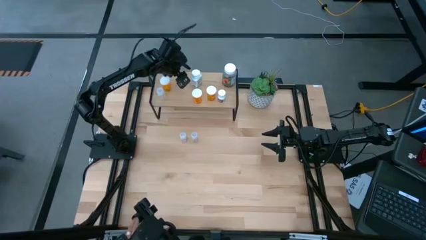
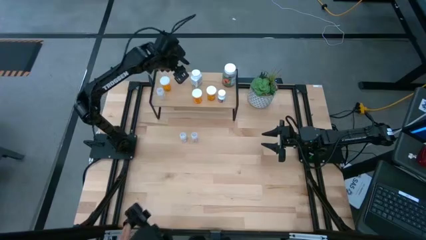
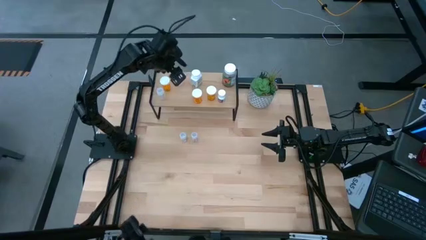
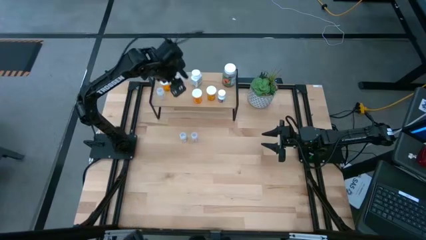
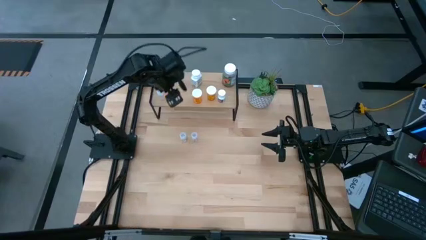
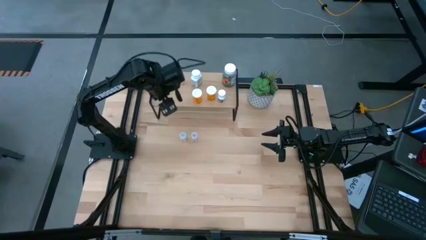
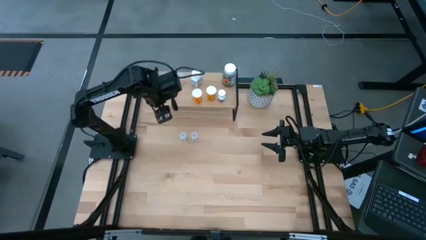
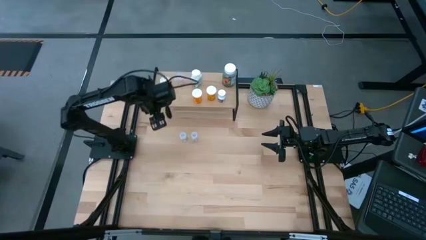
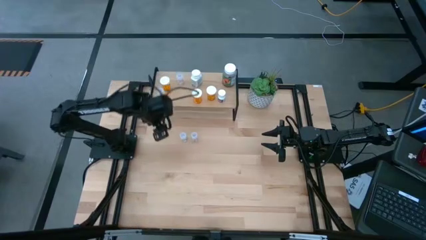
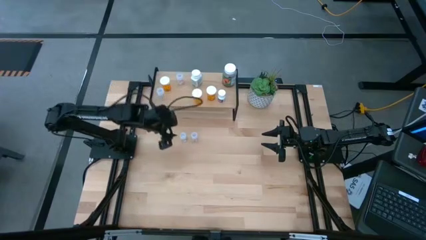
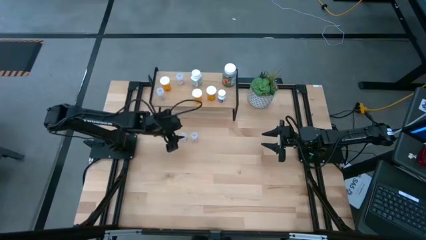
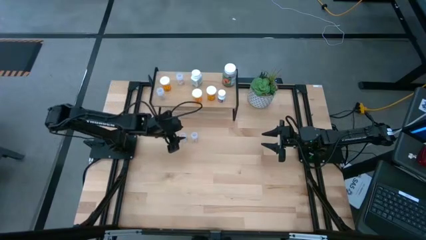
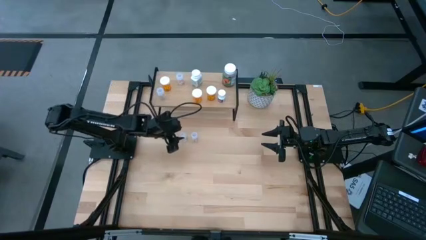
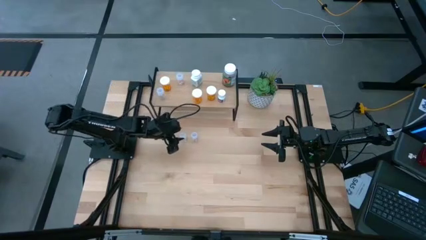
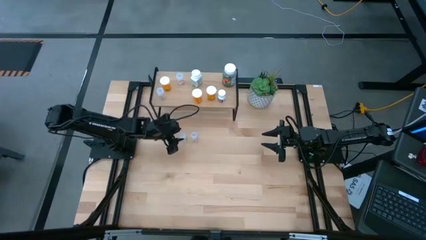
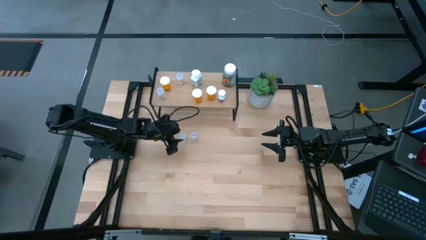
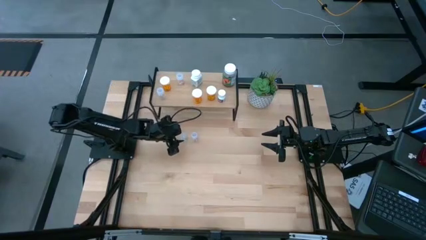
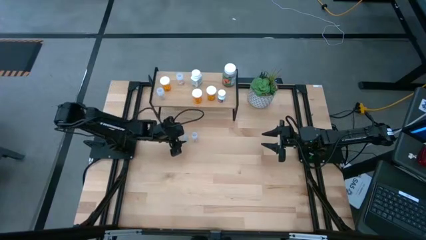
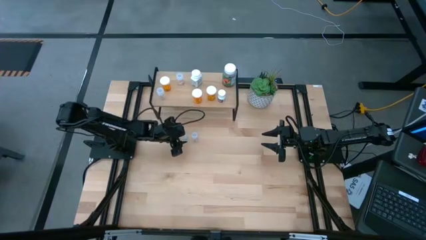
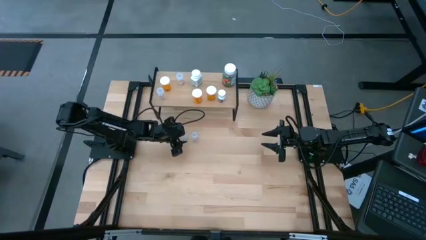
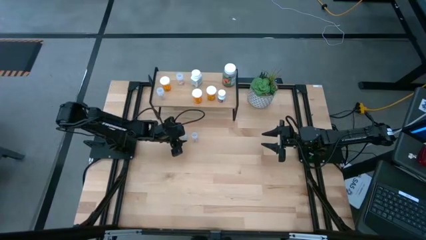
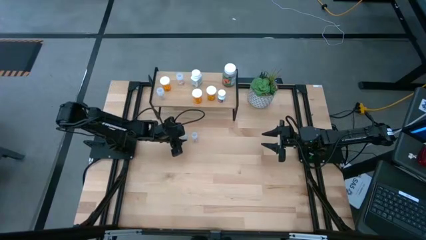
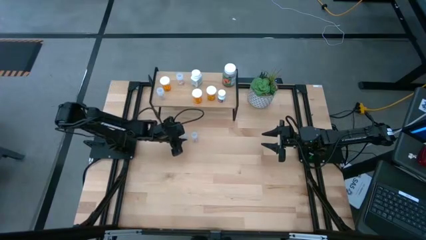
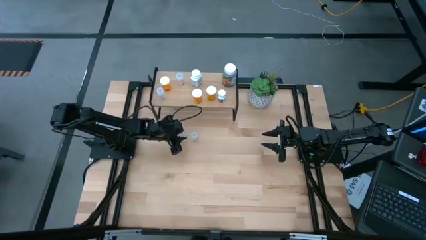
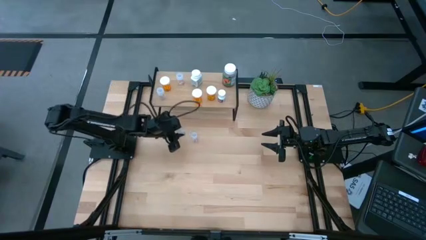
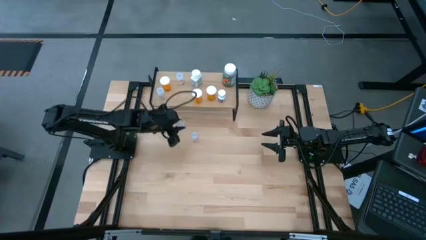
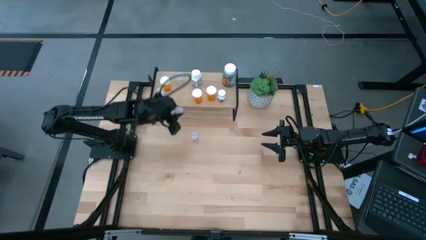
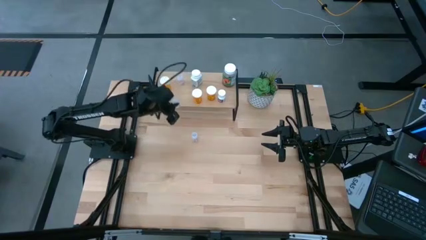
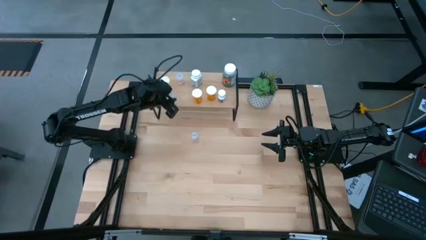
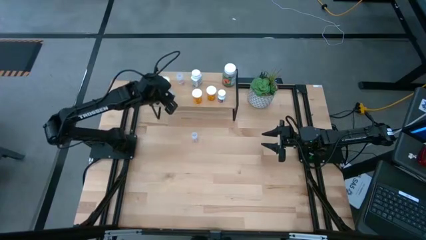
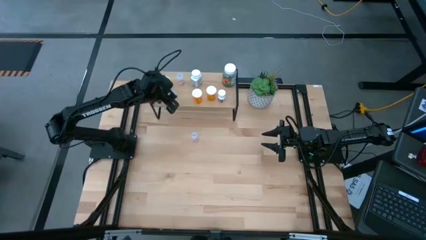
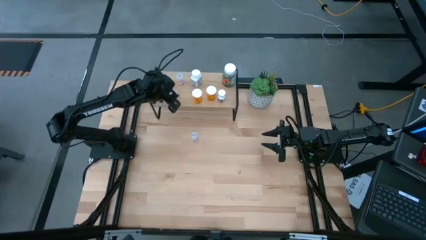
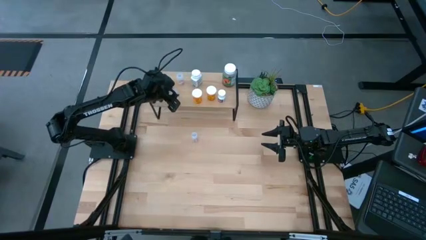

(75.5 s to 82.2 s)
Task: Pick and place medicine bottles onto shelf by color
Put the transparent pill bottle on the shelf

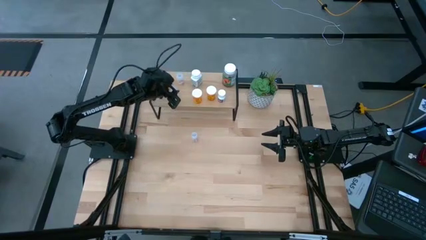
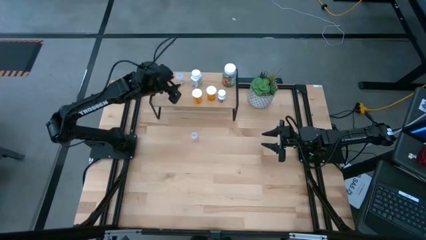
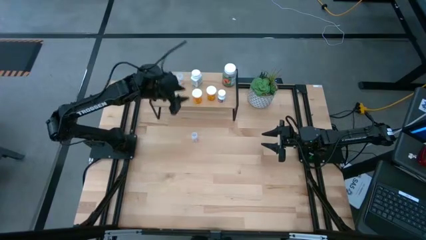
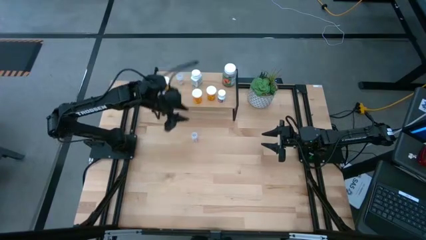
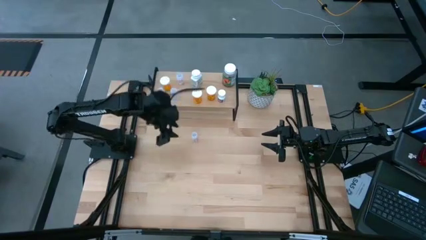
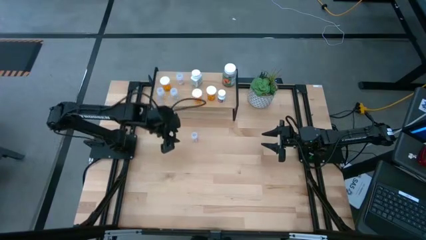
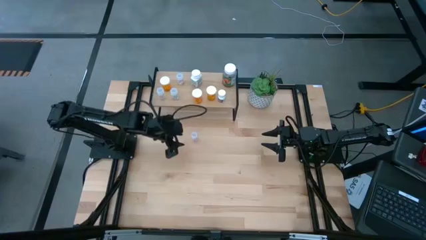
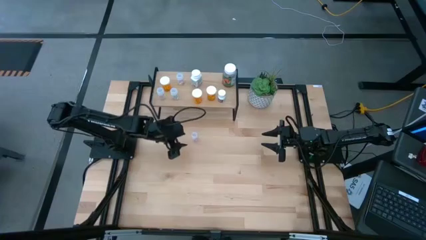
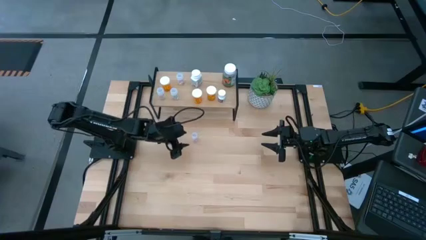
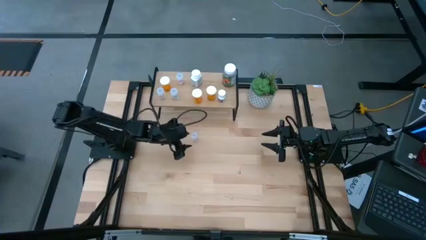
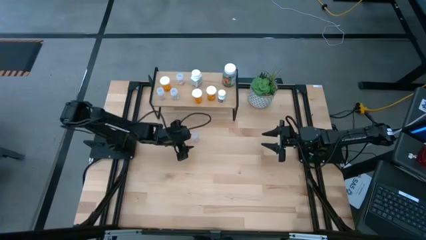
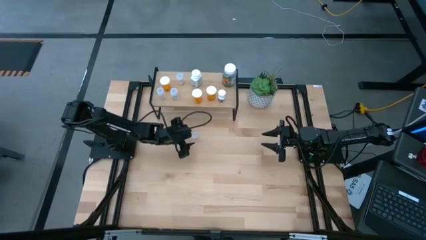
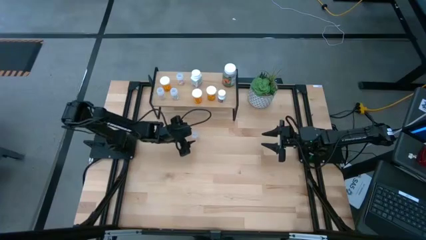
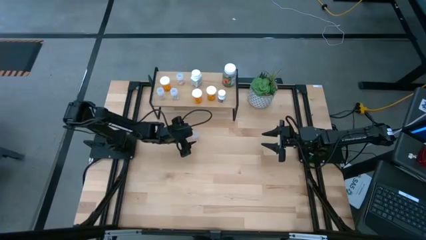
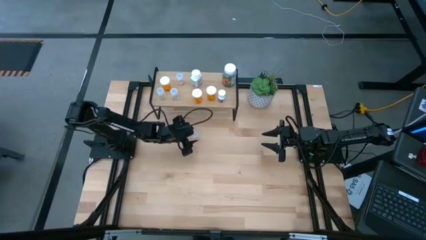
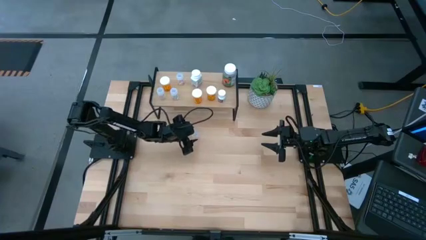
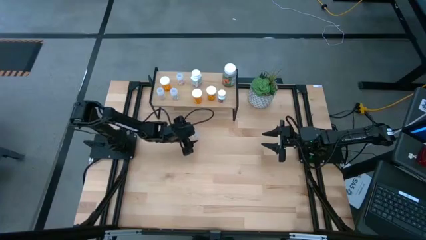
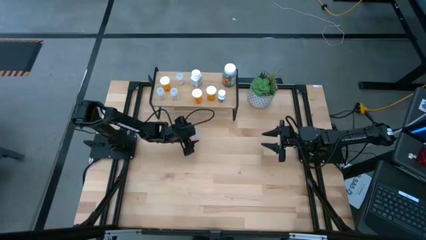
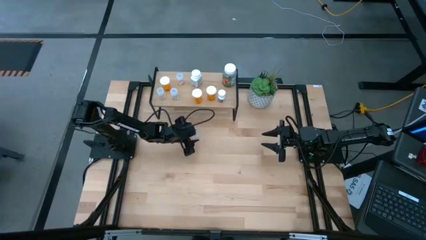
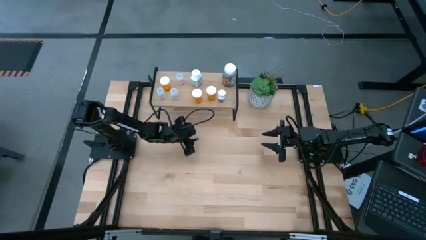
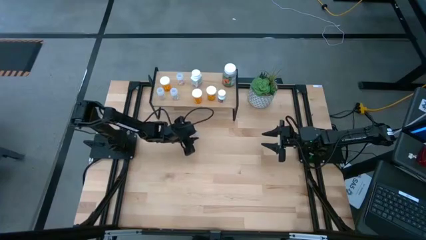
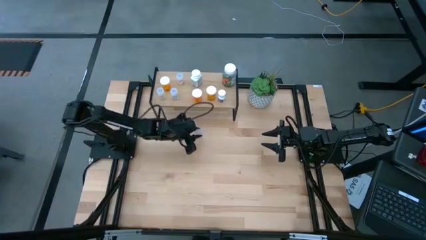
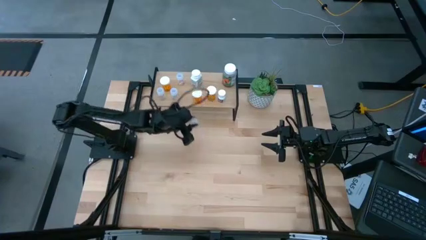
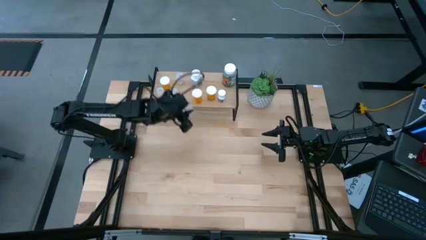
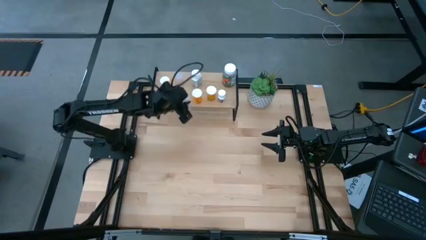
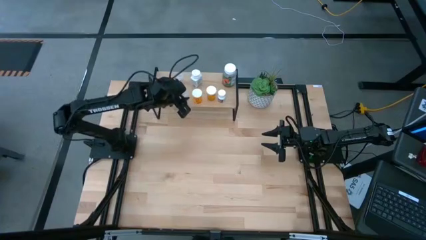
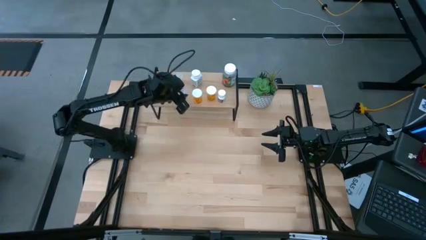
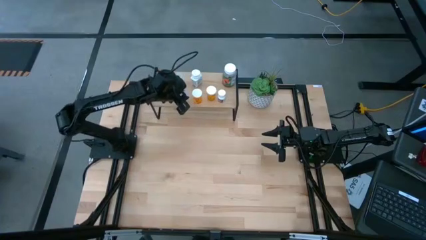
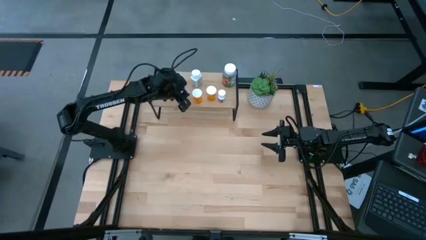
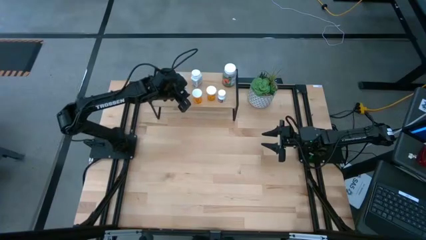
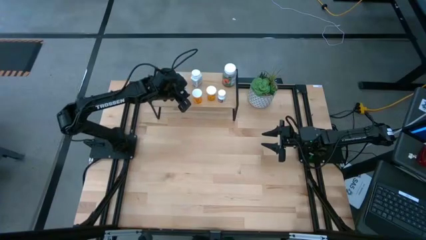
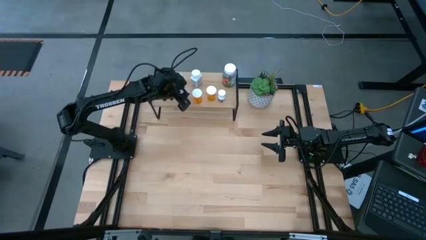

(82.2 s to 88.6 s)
Put the transparent pill bottle on the shelf

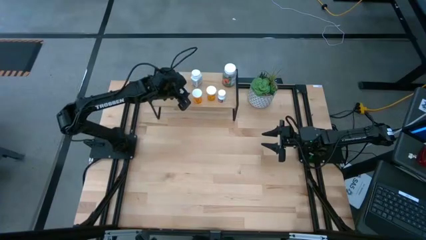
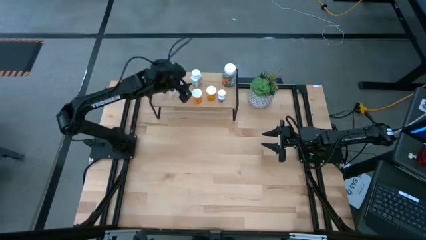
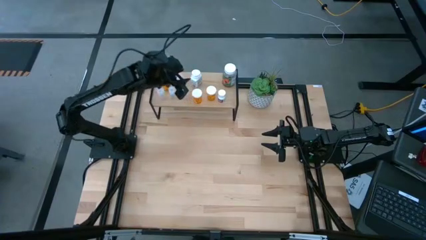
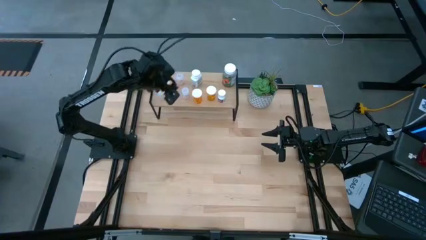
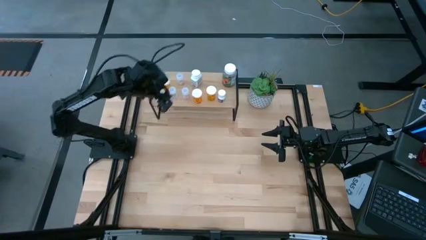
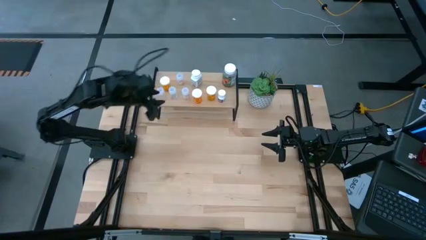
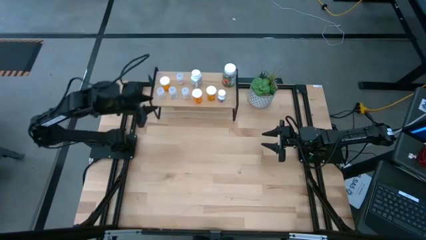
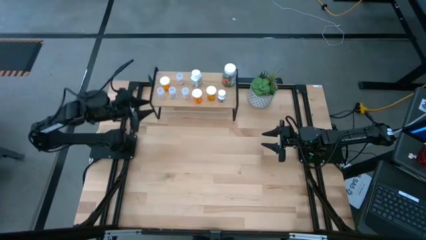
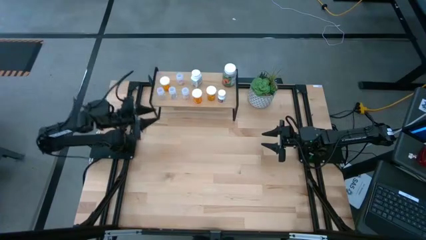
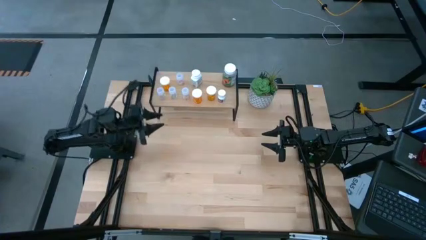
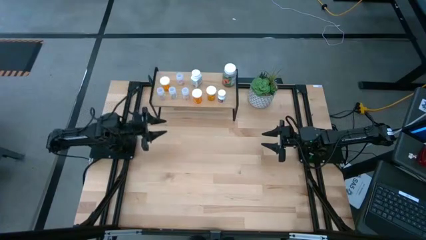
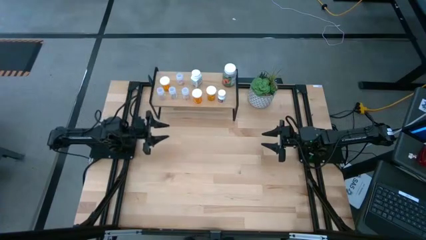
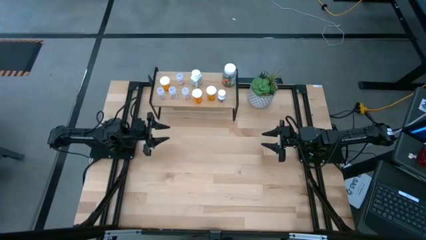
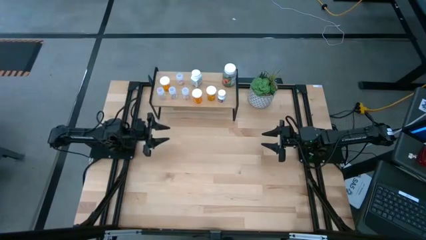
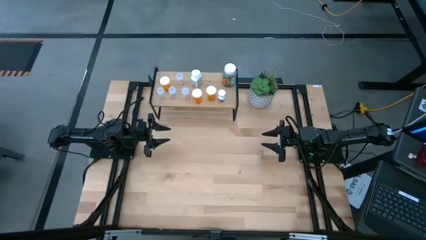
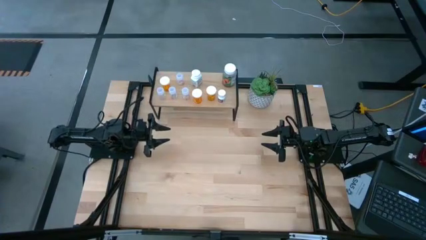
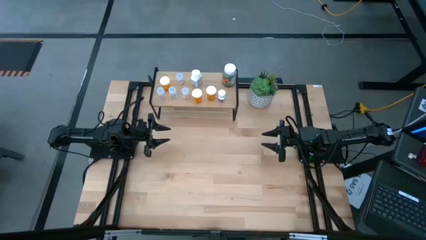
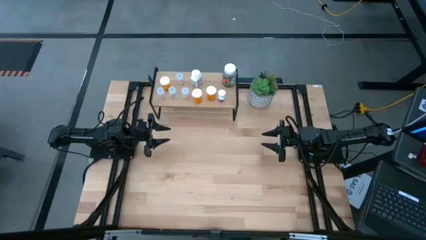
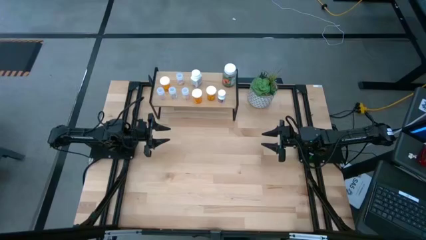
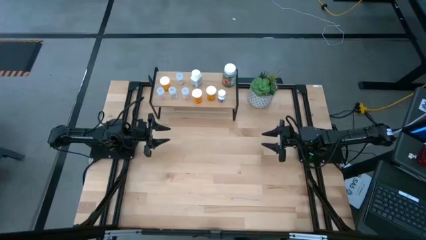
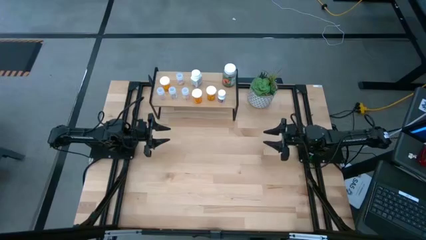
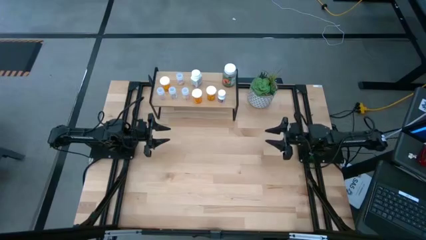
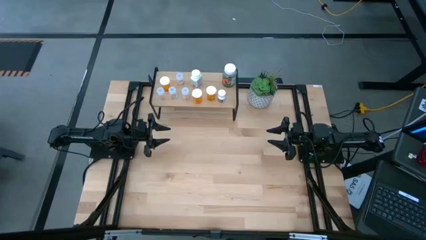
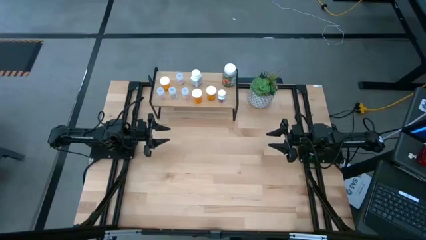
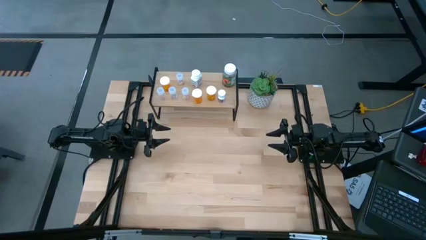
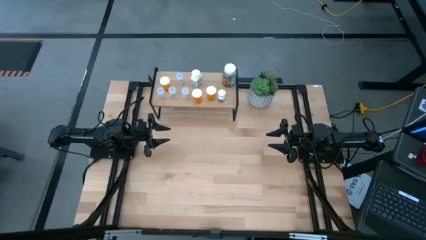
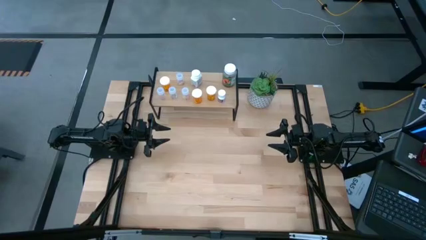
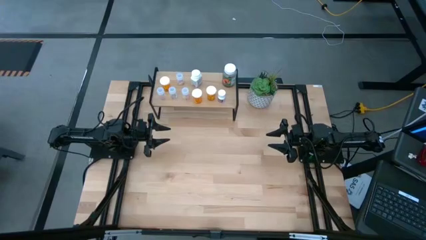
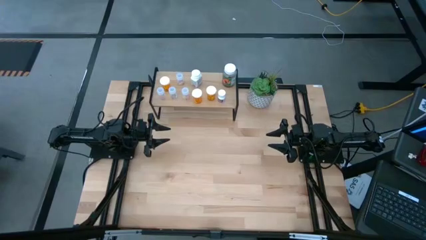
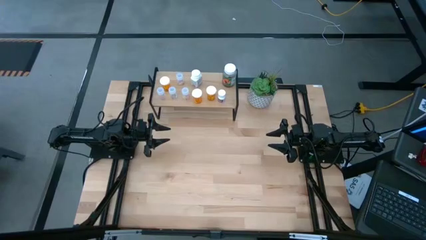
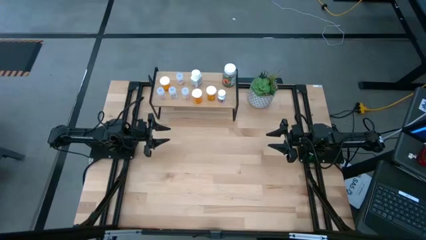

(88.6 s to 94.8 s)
Return to Home Position
